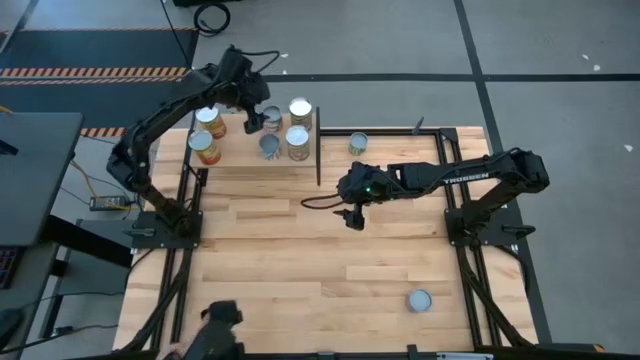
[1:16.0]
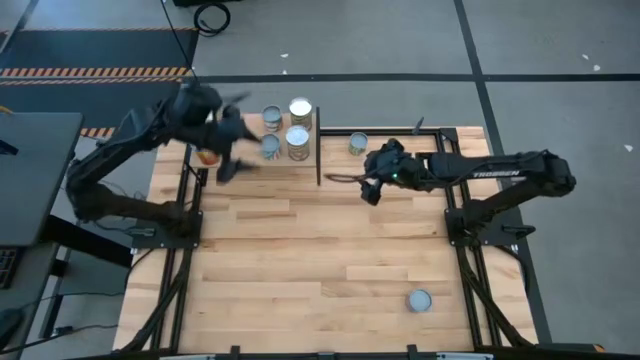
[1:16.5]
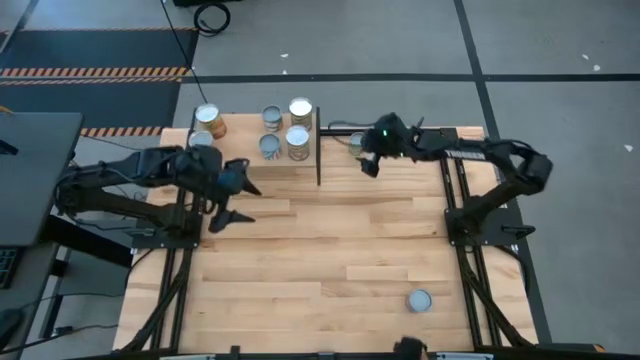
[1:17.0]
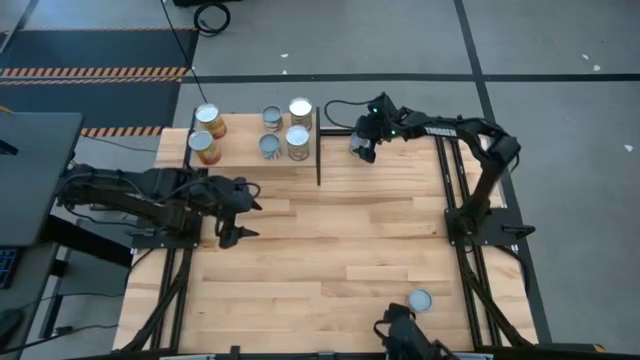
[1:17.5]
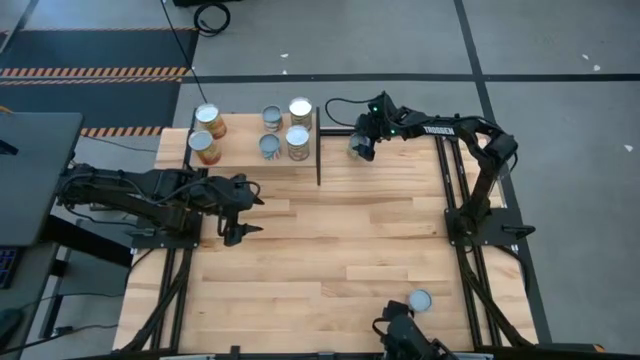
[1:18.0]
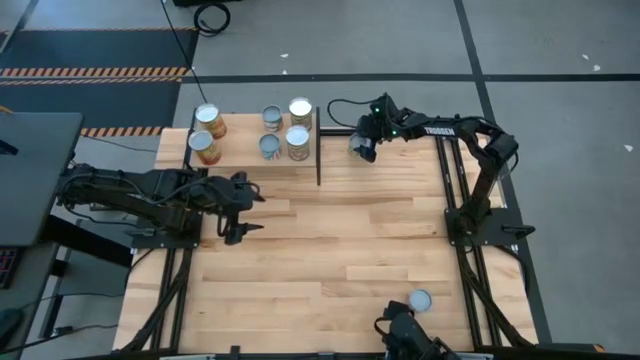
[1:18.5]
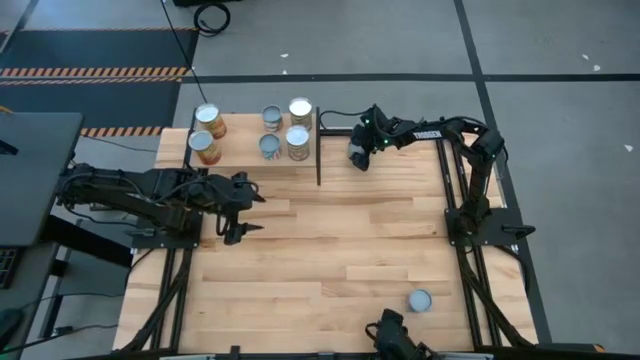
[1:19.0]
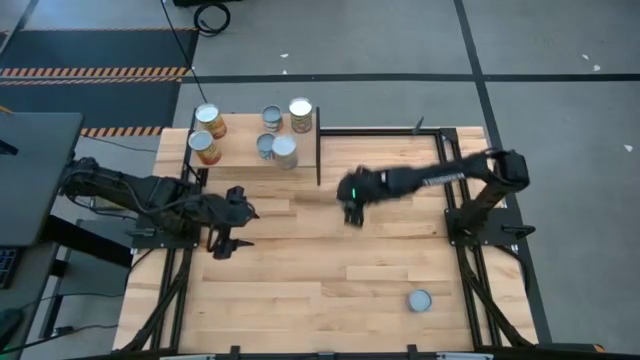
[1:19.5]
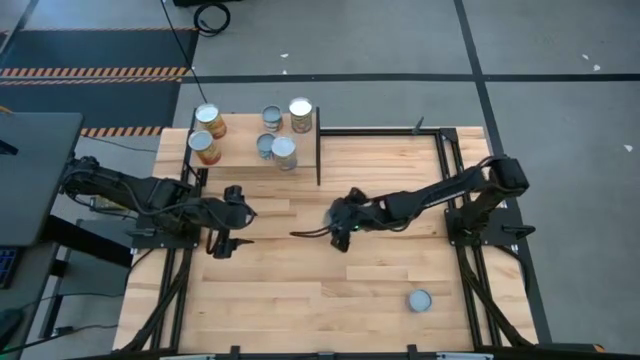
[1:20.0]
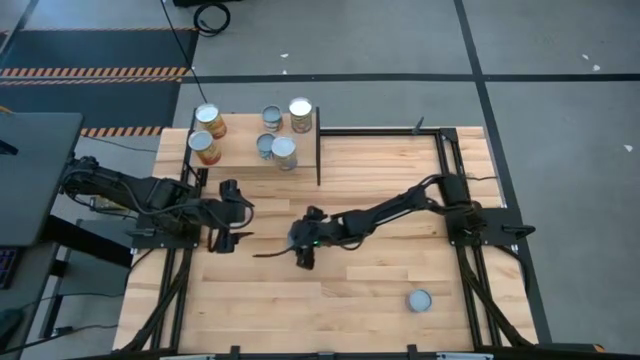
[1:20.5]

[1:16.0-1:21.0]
Task: Pick and place cans onto a shelf
Move the canned pickles to the center of the table

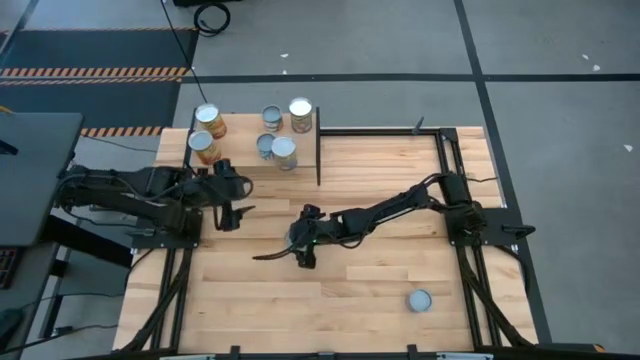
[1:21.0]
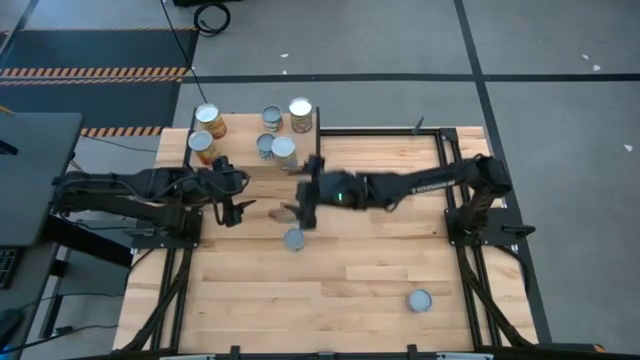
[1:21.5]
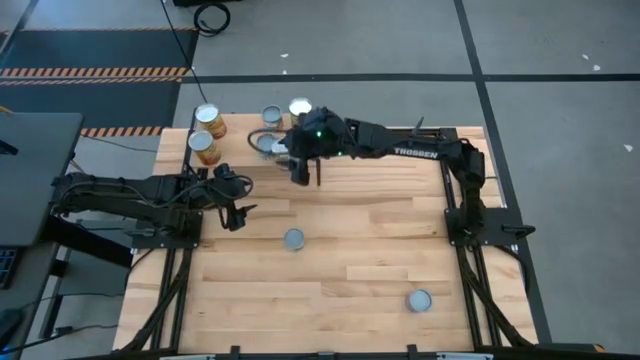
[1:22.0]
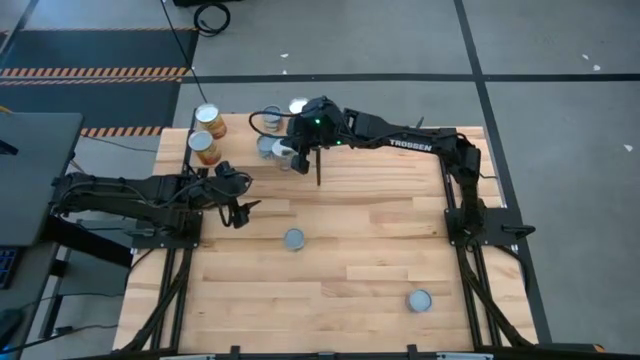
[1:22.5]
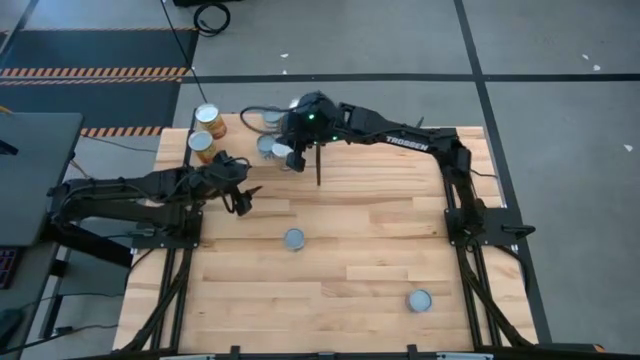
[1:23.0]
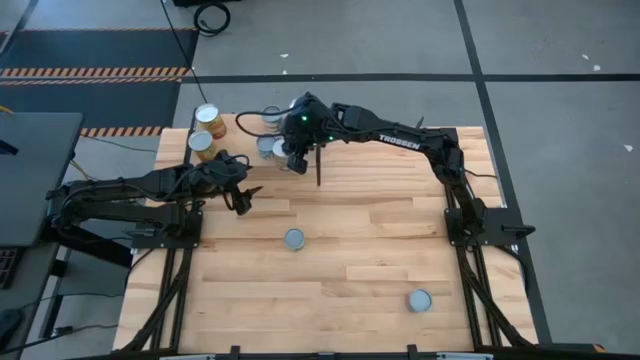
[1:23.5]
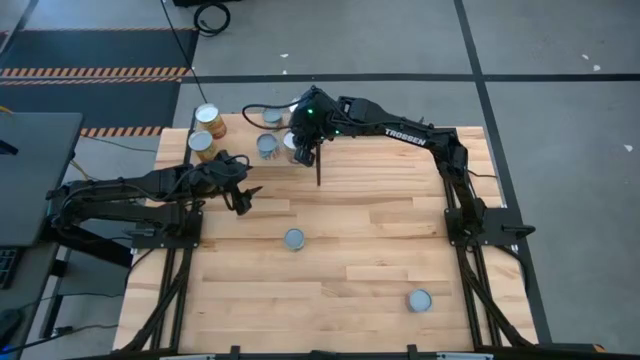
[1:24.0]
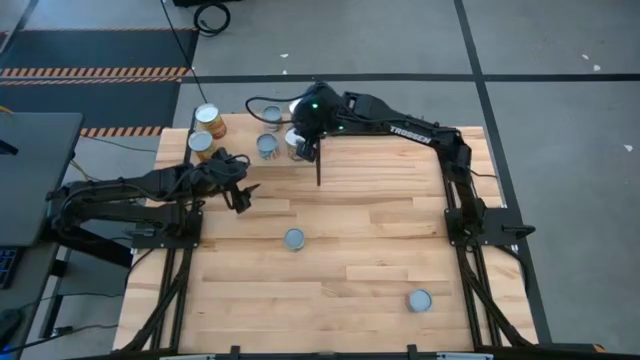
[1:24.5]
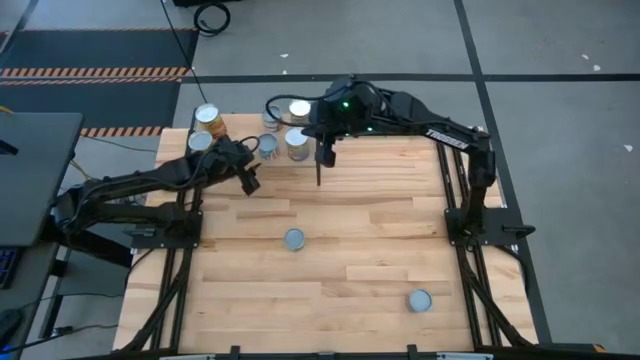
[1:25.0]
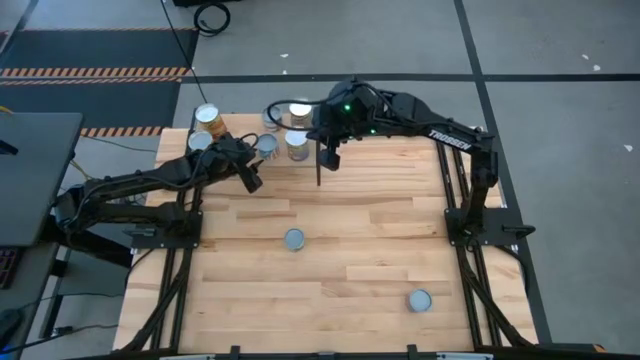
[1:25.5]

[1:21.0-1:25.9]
Adjust the canned goods on the shelf

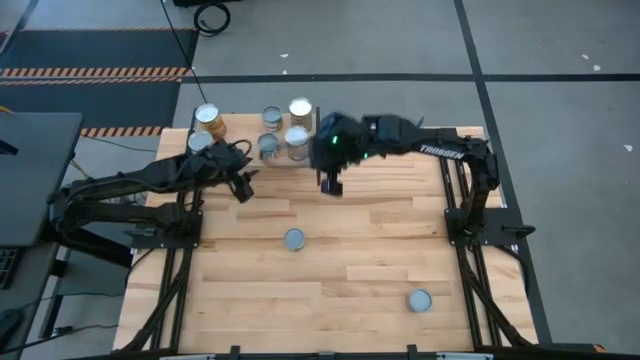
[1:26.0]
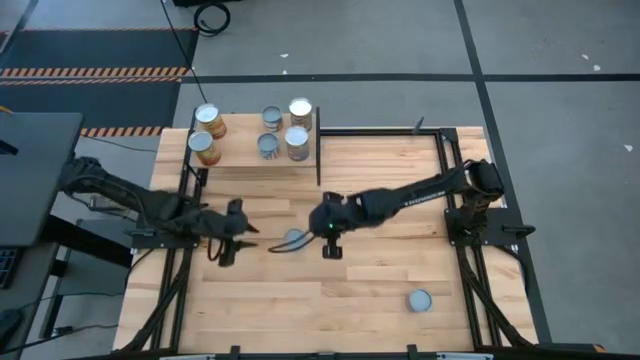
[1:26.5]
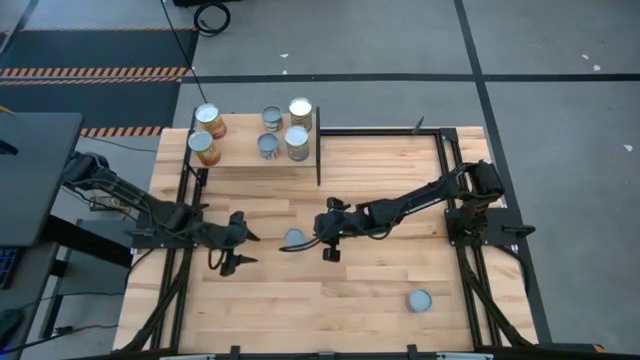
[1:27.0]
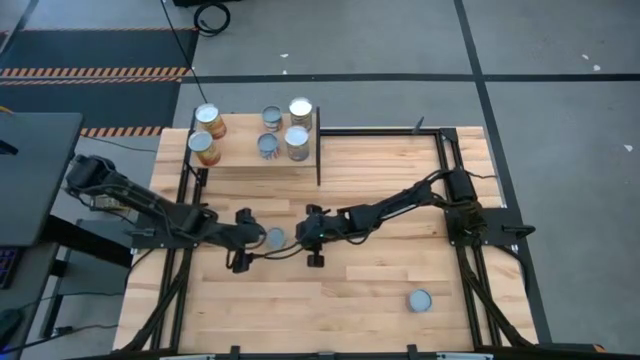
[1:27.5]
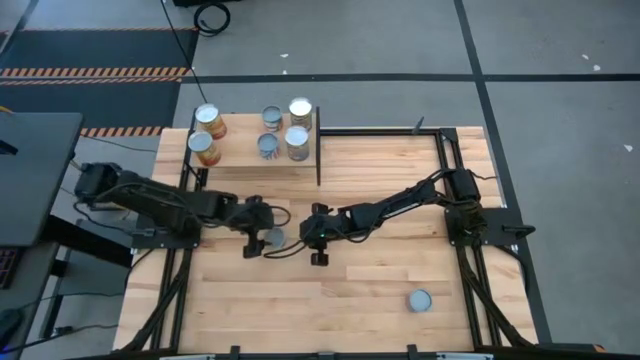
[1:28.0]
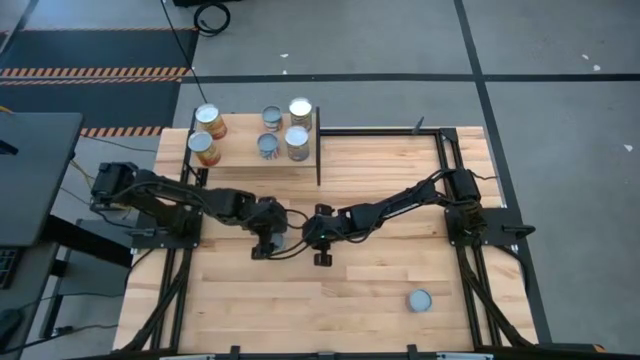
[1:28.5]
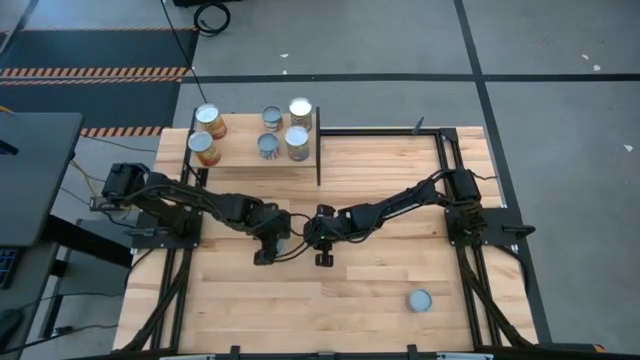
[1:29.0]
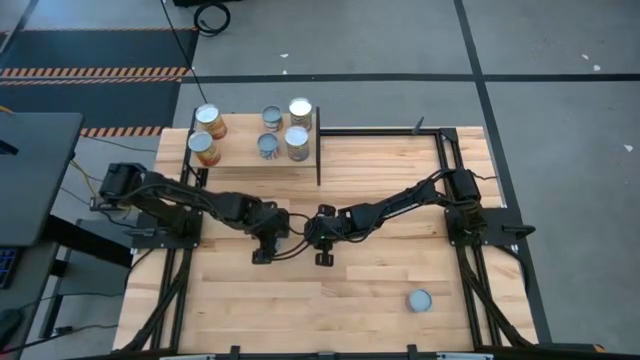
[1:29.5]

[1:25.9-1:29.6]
Put the canned pickles on the shelf

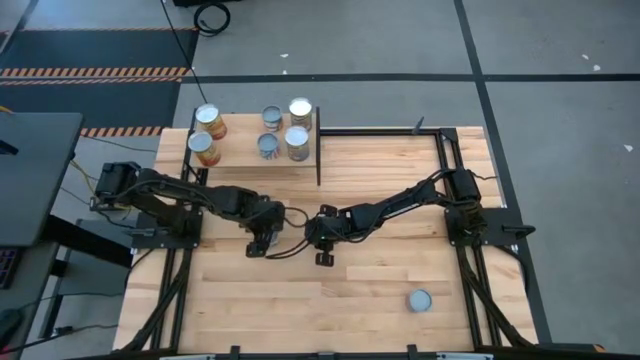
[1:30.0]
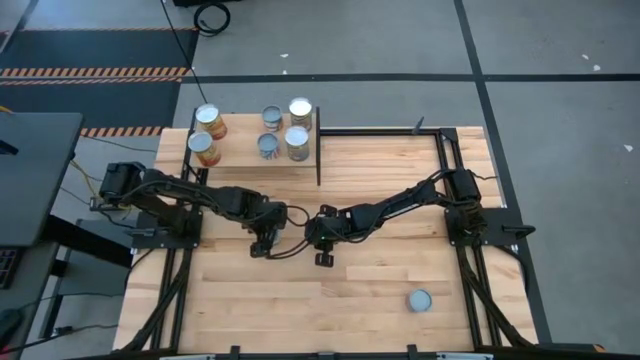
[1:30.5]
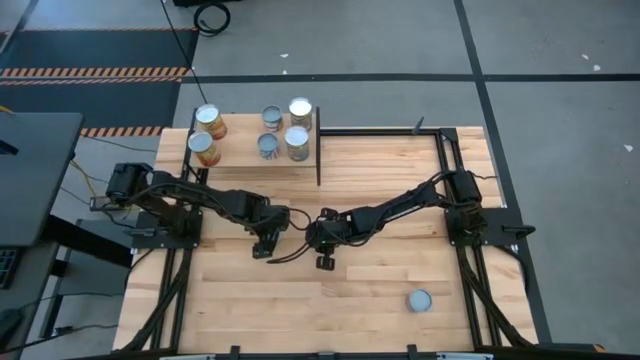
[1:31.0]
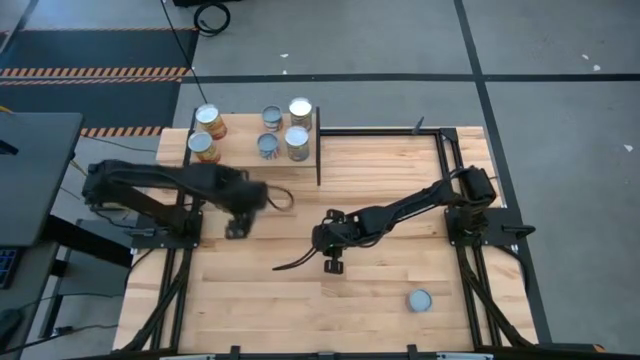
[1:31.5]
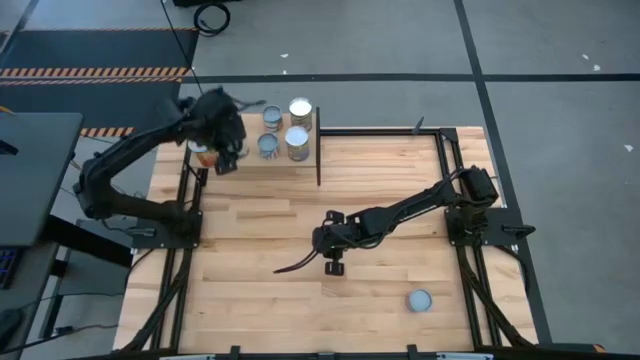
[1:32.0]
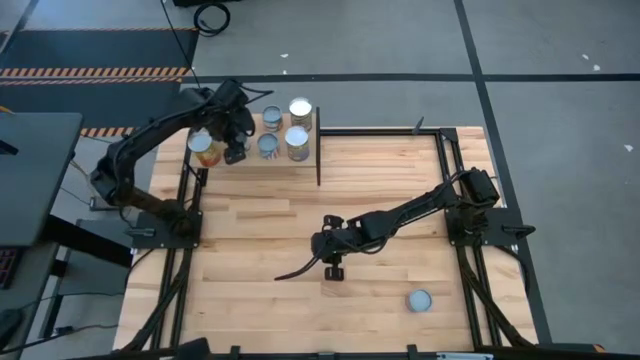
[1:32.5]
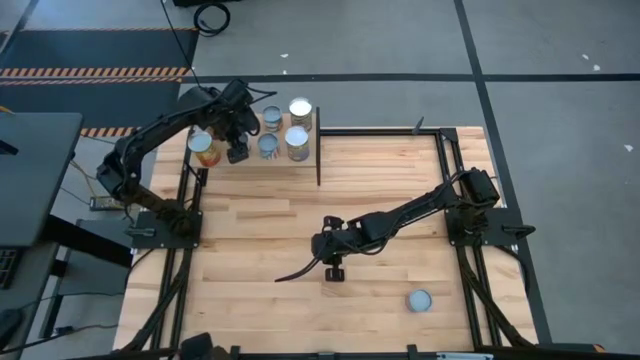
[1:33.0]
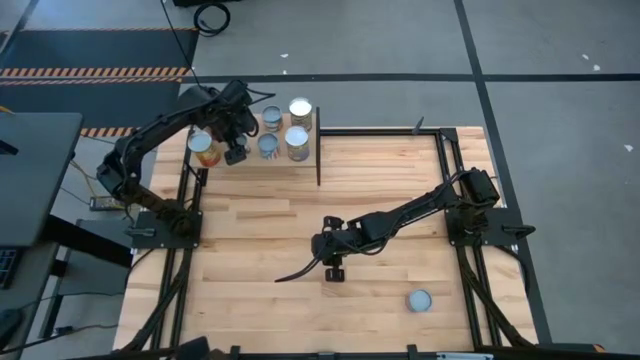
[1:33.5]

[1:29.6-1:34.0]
Put the canned pickles on the shelf

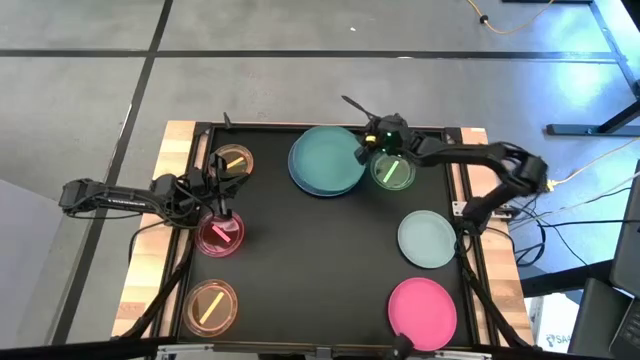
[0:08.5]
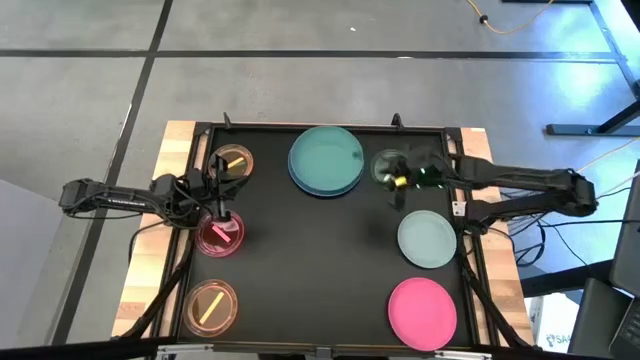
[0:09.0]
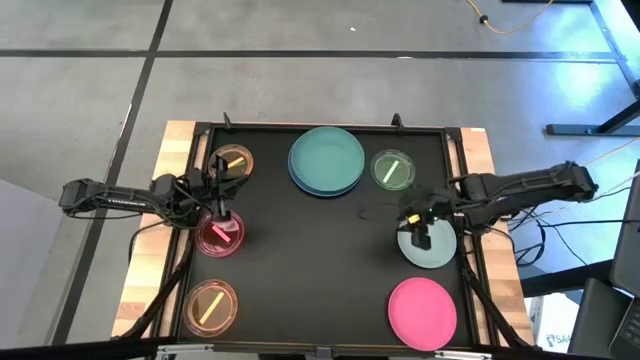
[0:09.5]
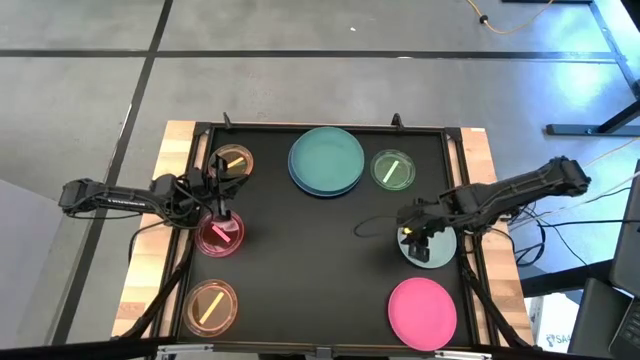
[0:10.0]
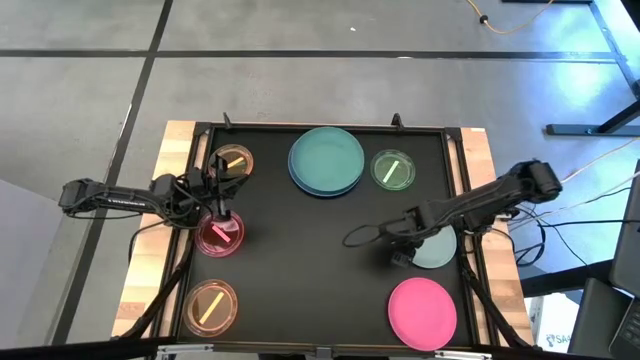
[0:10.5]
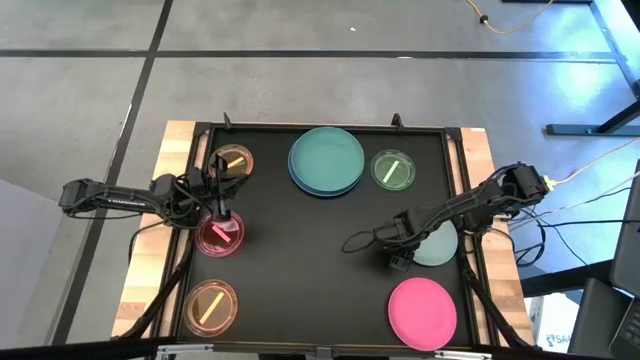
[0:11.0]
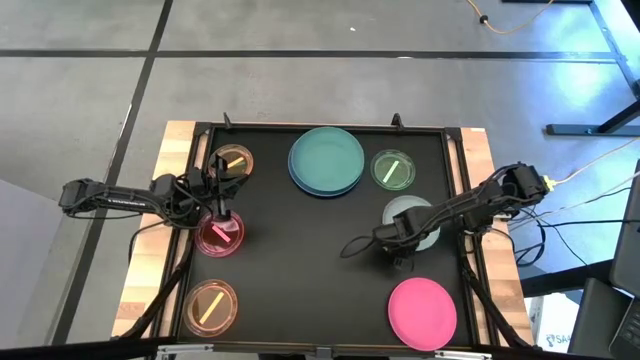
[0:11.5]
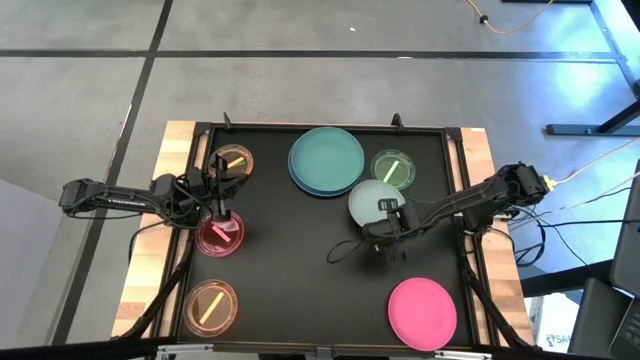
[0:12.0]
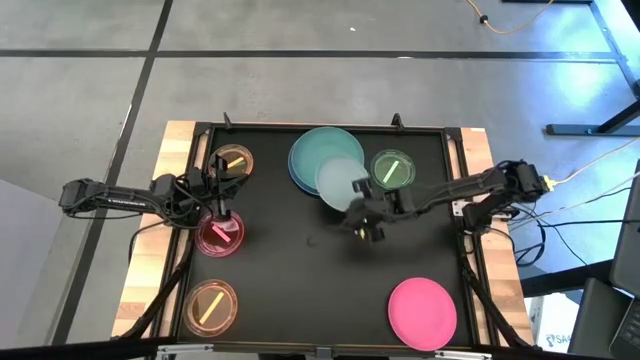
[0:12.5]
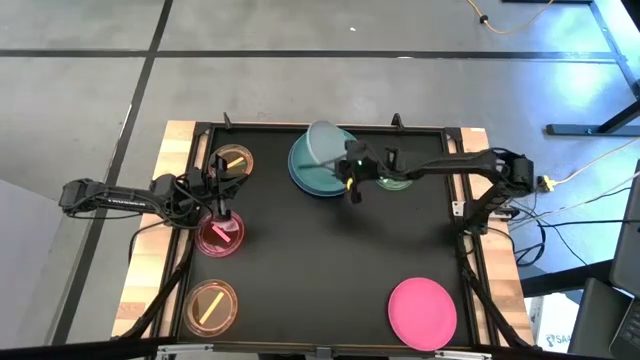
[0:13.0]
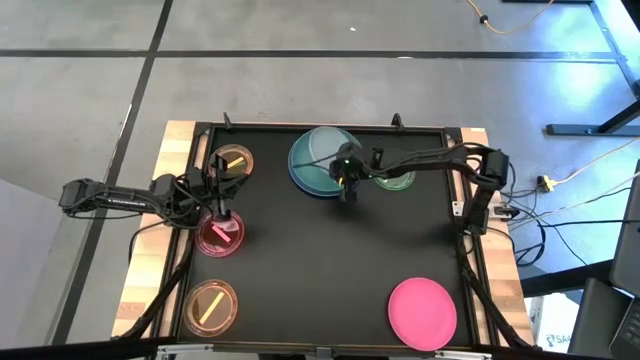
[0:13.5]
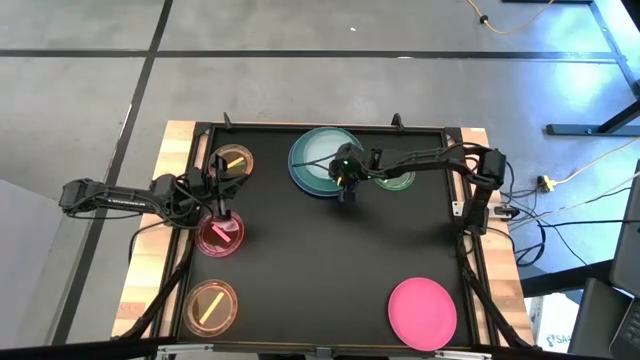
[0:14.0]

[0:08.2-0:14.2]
Task: Stack plastic plates
Stack the gray plate on top of the the green plate
